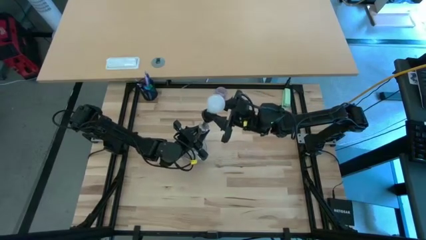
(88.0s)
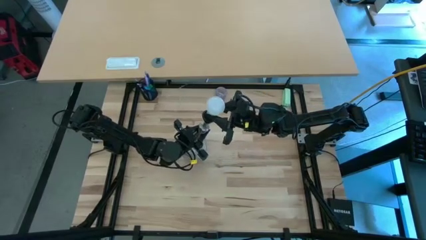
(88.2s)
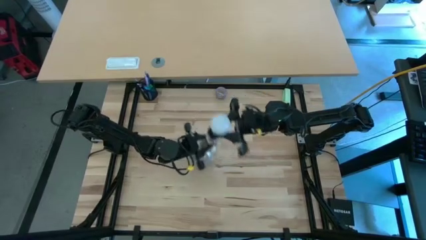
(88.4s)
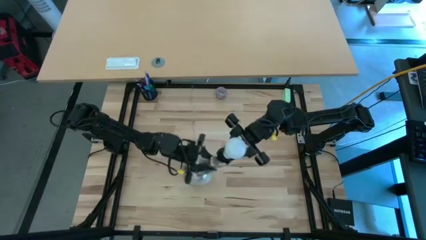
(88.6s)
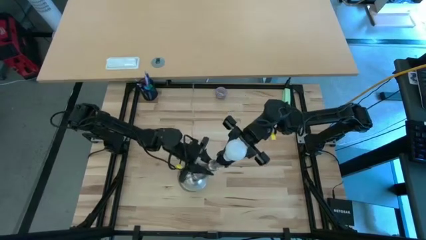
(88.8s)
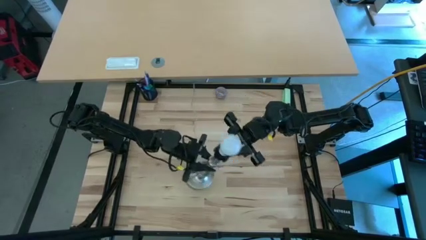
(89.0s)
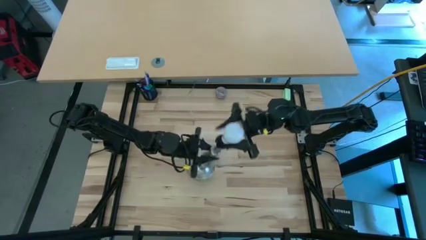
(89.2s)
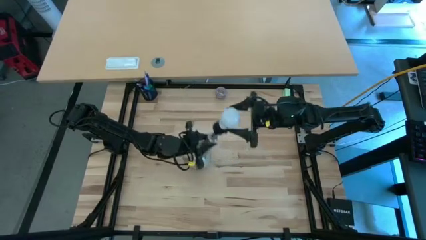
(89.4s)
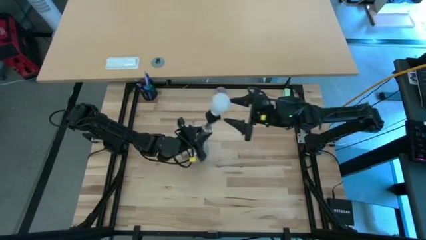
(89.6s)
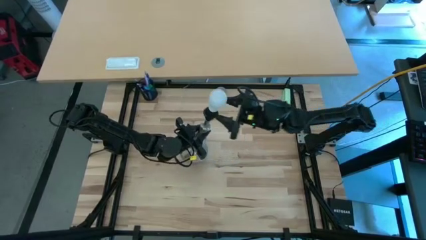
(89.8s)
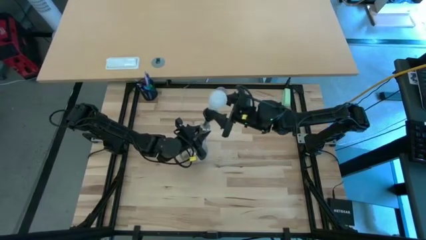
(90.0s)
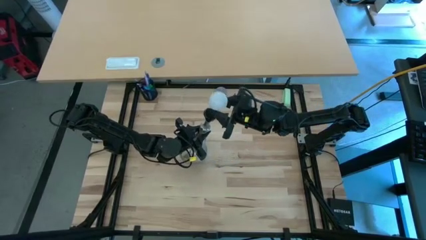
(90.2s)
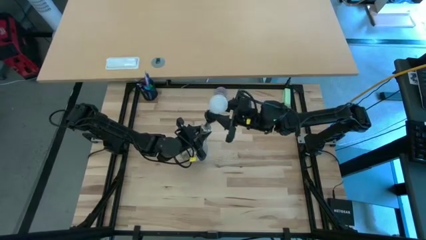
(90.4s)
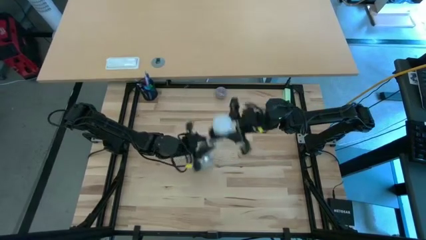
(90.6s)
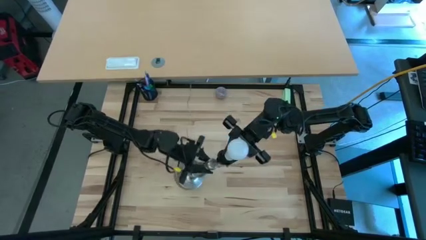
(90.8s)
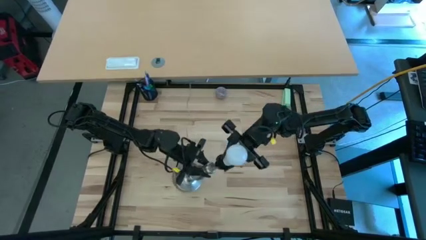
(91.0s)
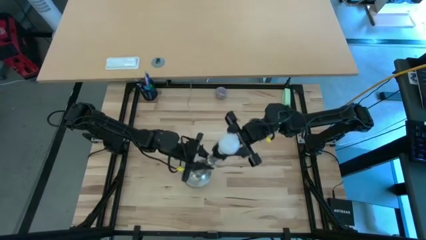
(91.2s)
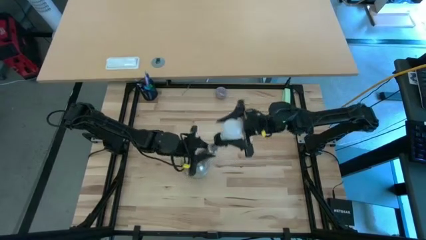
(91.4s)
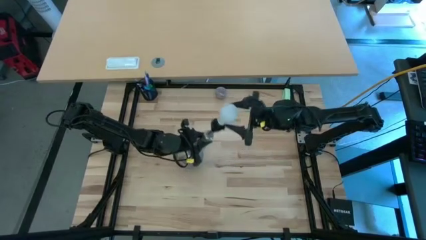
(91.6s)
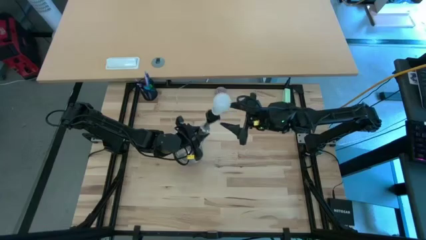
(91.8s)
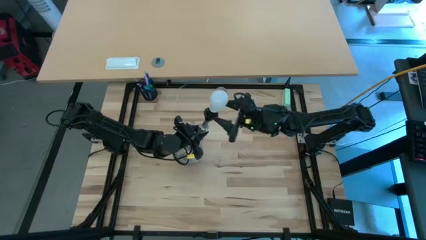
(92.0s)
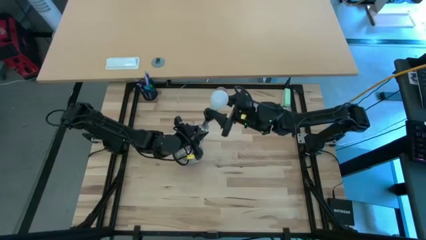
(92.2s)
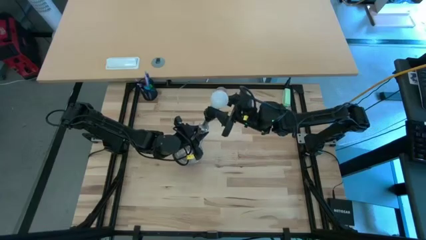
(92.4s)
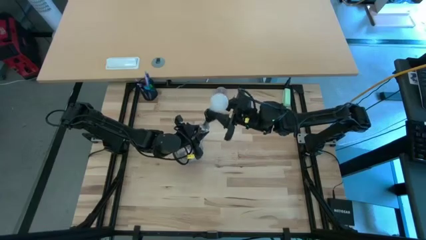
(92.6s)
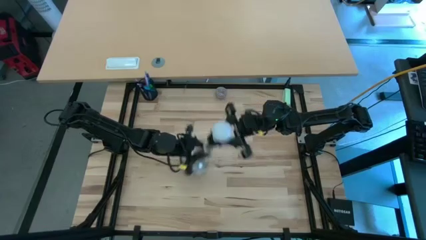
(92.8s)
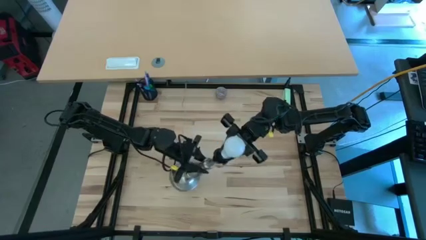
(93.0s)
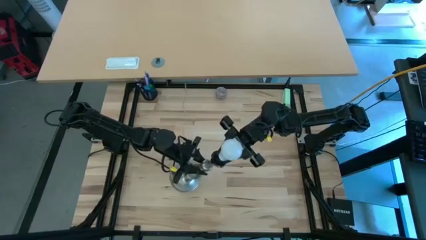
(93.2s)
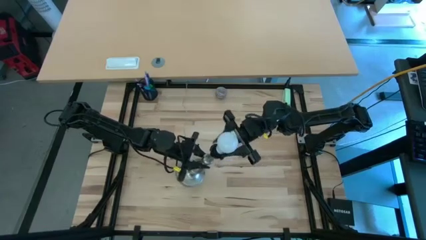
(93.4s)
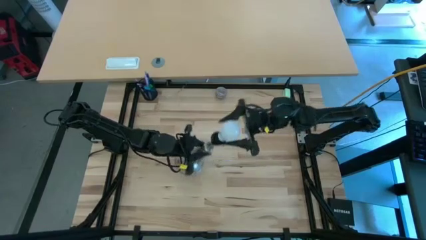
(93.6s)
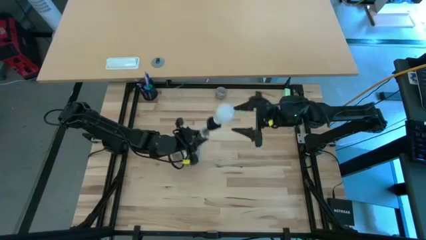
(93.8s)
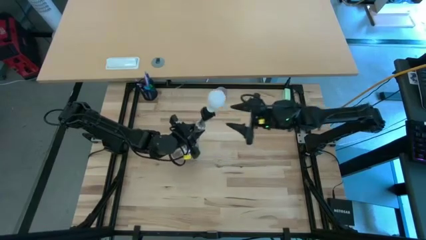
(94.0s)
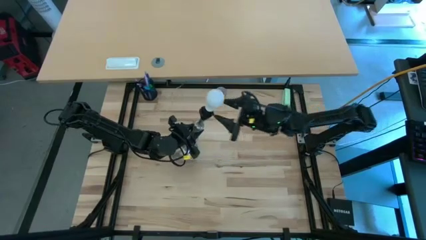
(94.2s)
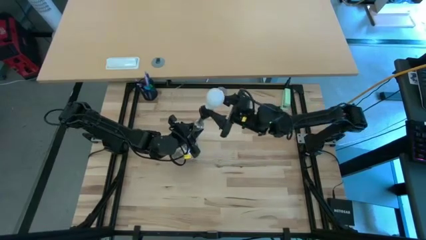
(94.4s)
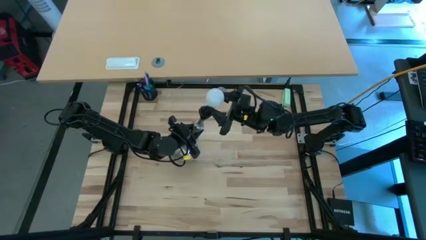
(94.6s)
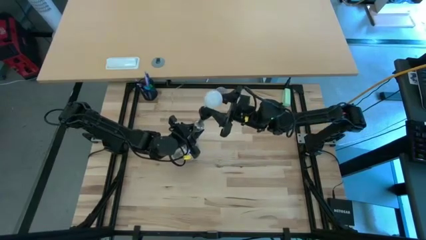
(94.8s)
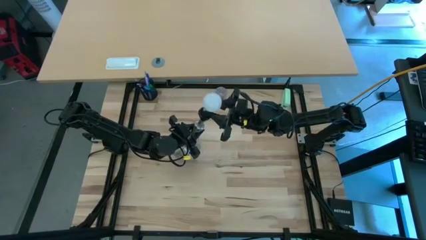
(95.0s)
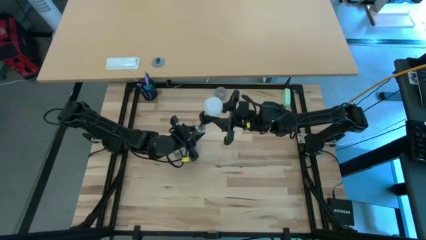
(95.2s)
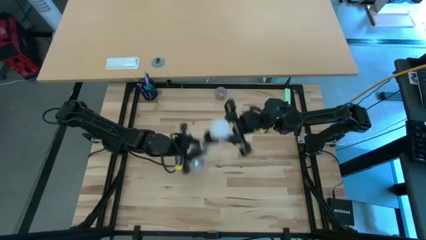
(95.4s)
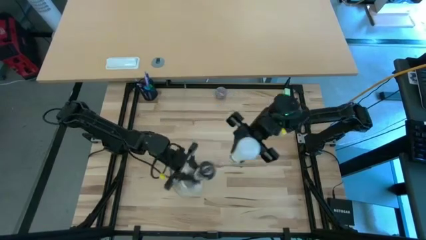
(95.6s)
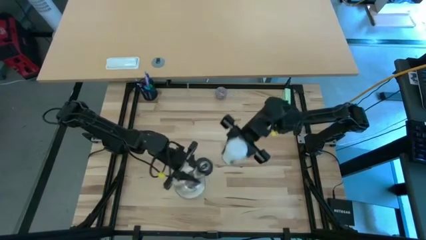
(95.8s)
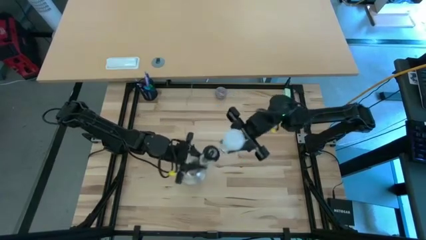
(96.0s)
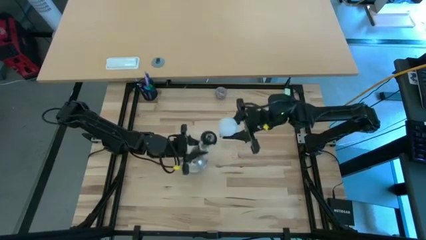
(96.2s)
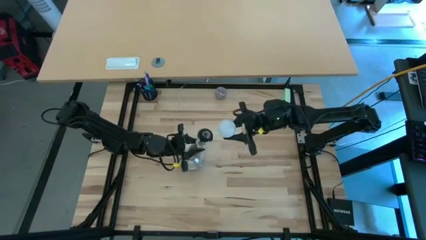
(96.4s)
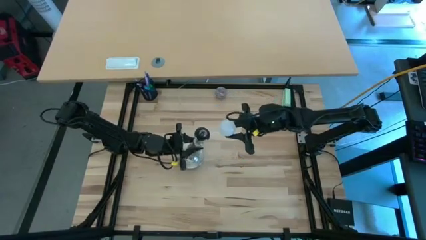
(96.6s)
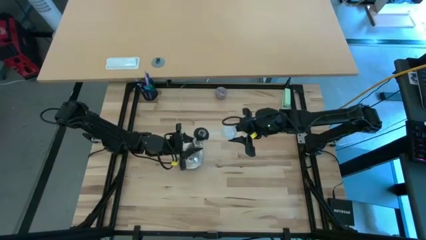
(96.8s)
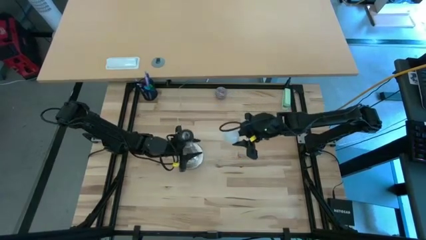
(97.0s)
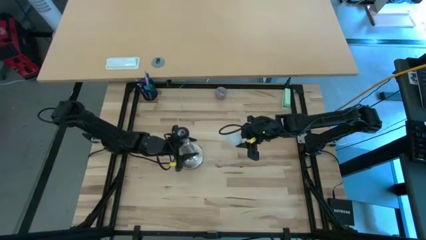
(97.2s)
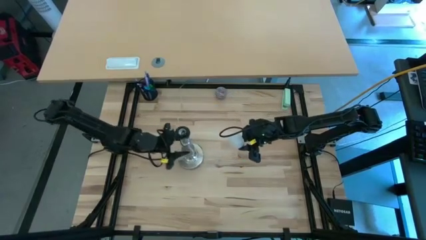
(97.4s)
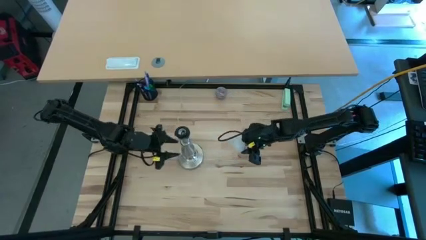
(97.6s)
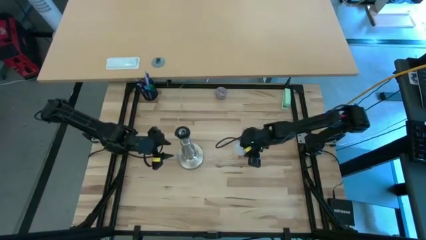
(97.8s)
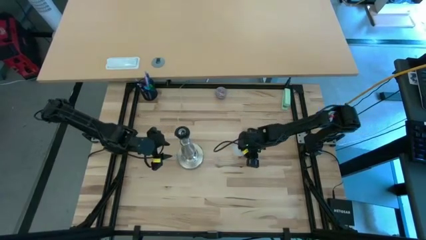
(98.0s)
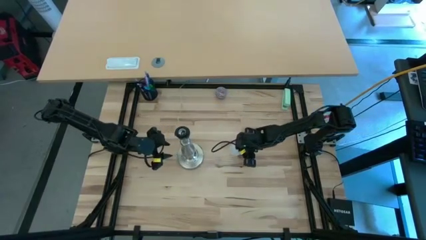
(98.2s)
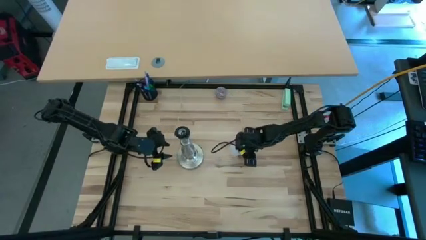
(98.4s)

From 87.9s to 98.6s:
Task: Screw lightbulb
Remove the lightbulb from the silver lamp

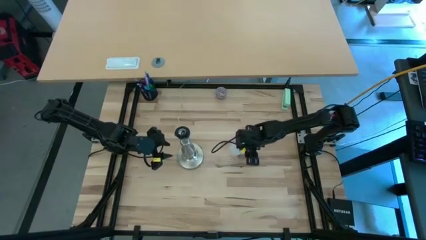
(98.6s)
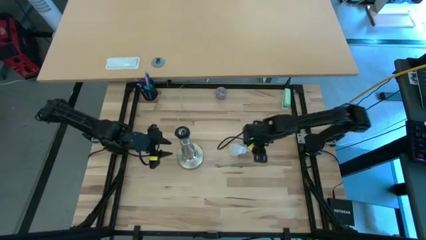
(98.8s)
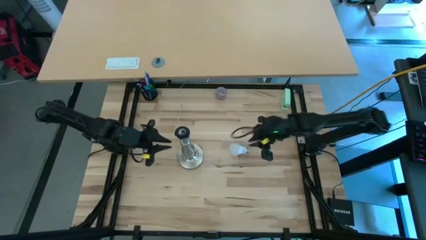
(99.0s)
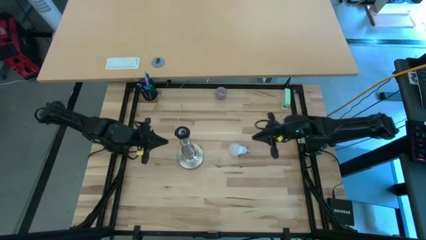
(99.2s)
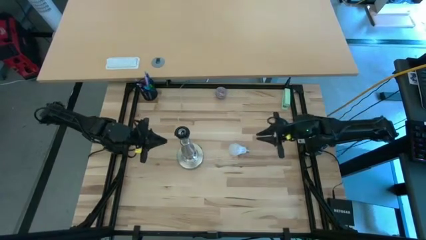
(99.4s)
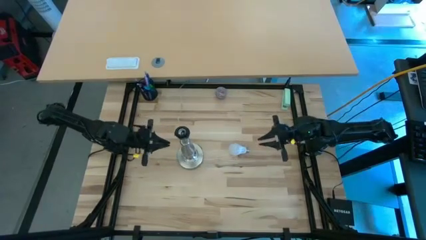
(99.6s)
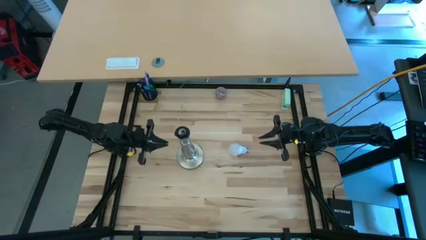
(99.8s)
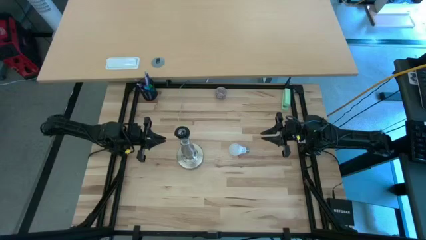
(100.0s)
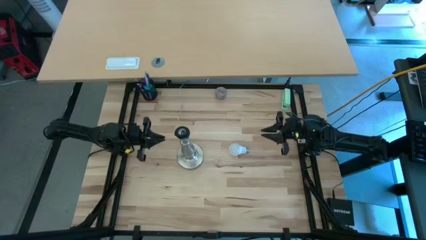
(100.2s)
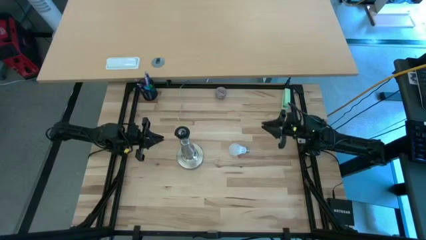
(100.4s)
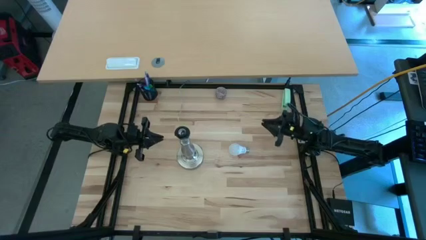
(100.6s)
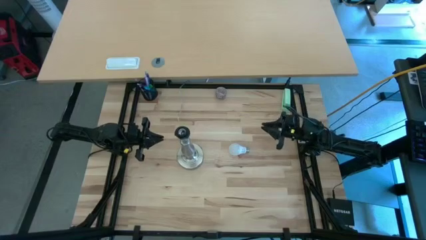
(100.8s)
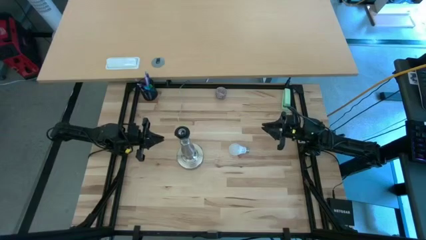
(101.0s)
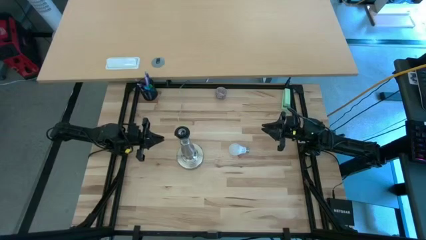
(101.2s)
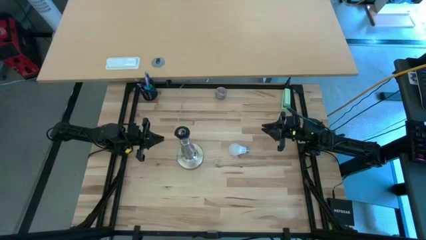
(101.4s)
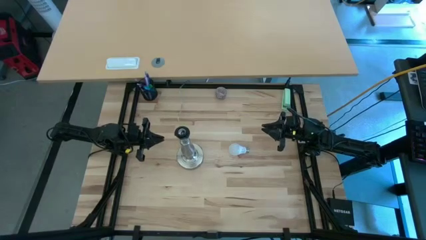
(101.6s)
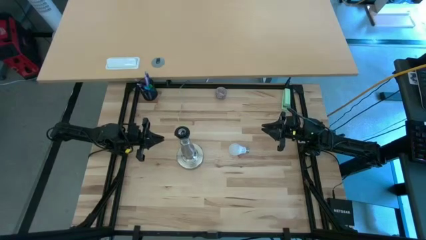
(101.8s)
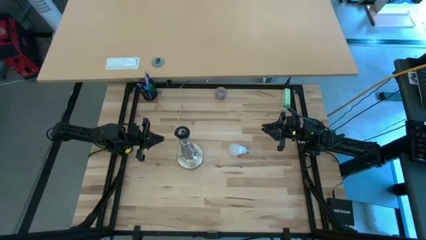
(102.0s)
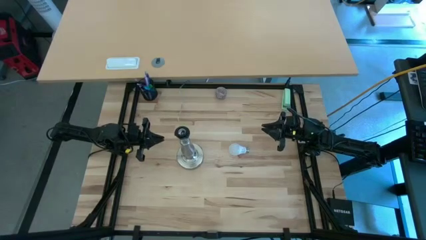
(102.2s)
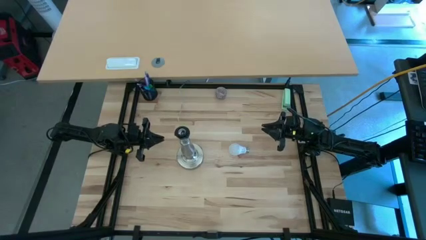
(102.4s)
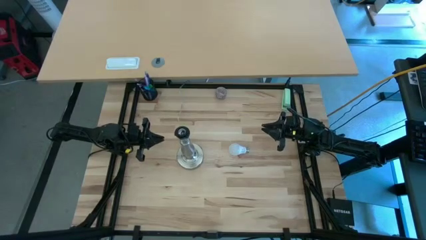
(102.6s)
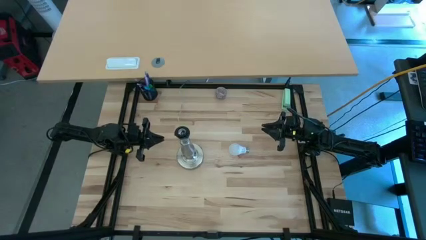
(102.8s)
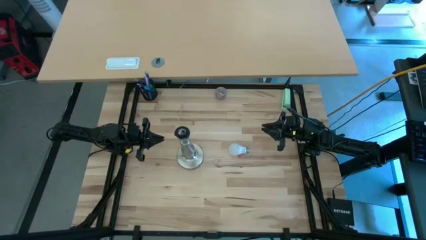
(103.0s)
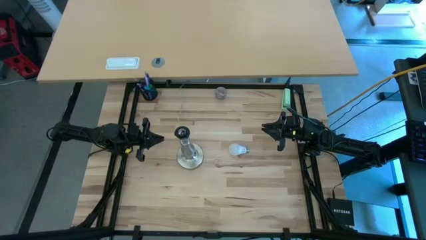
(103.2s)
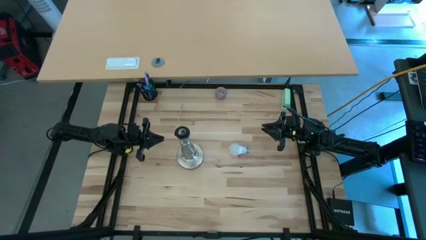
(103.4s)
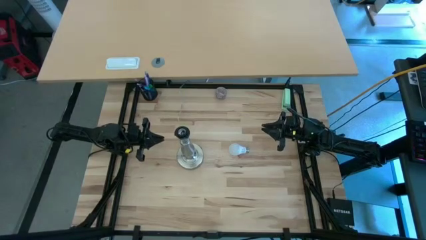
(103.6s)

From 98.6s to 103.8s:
Return to Home Position
